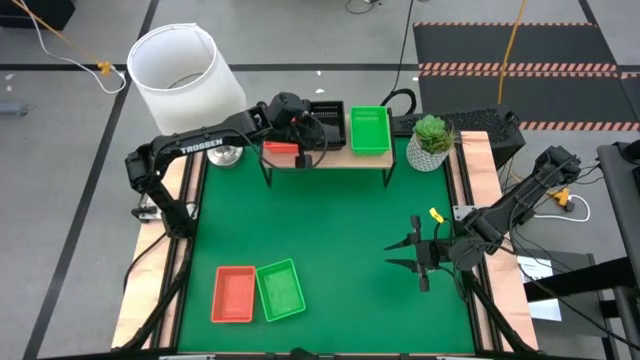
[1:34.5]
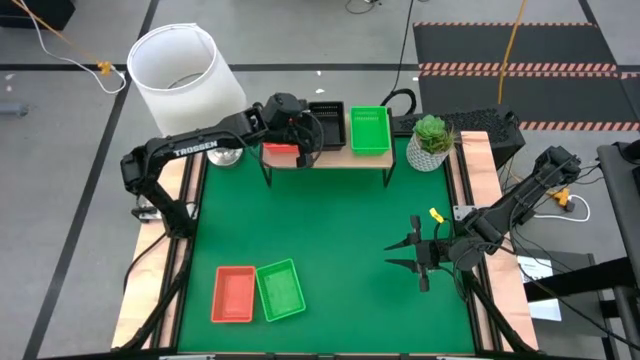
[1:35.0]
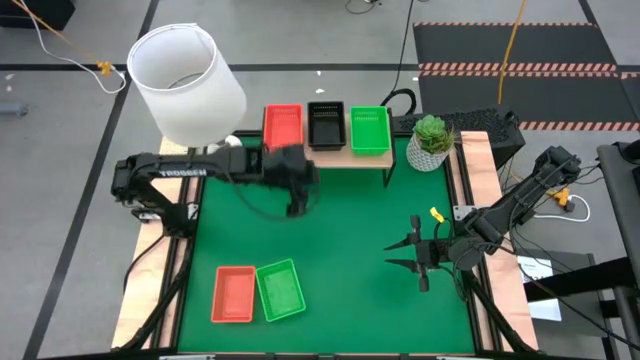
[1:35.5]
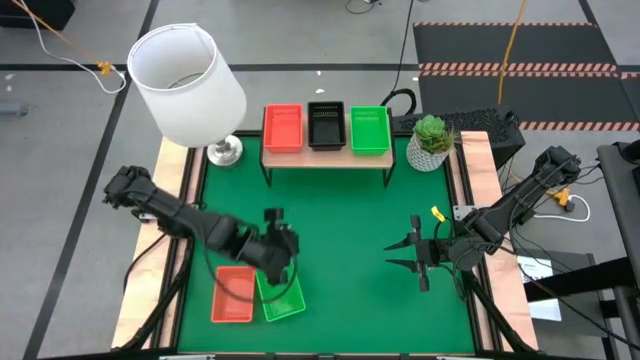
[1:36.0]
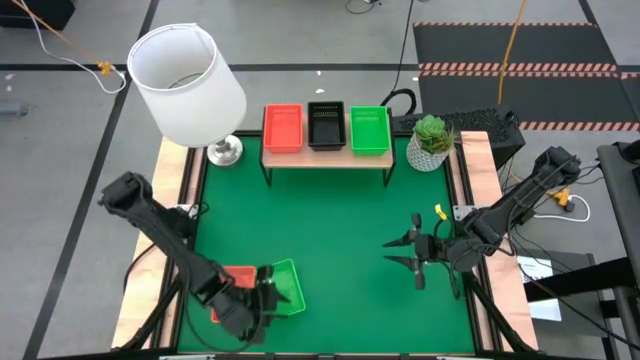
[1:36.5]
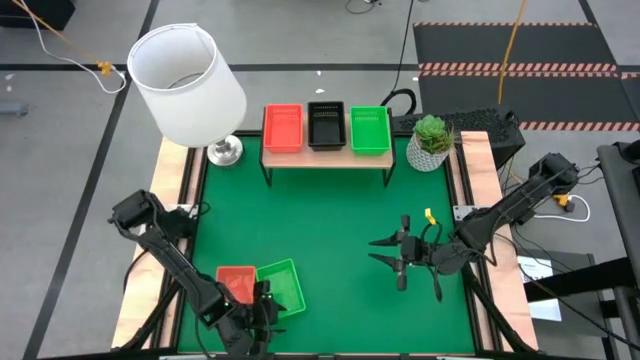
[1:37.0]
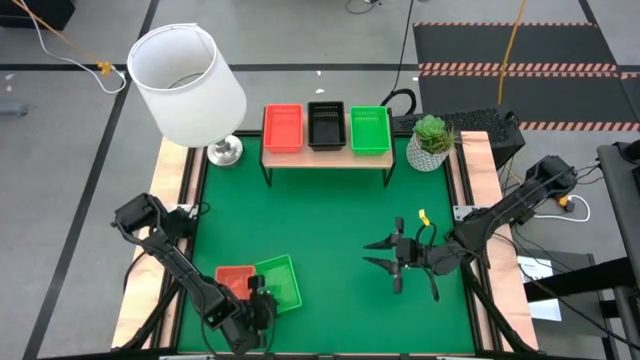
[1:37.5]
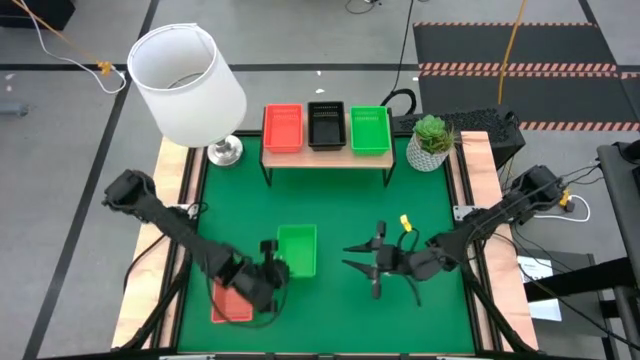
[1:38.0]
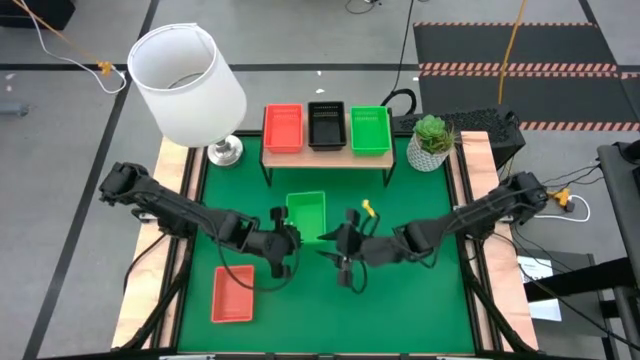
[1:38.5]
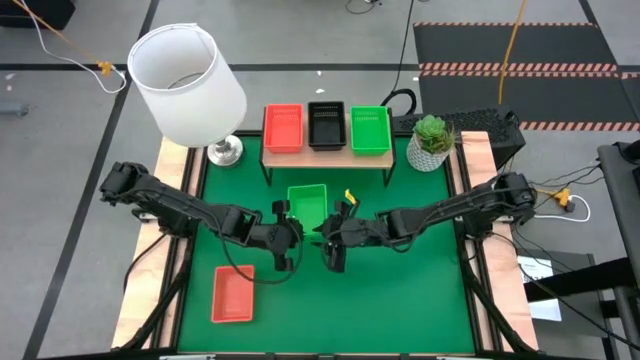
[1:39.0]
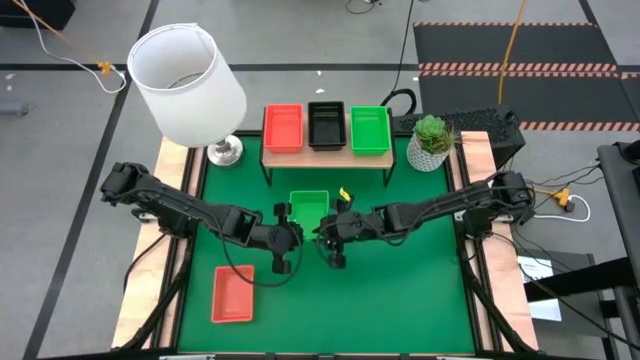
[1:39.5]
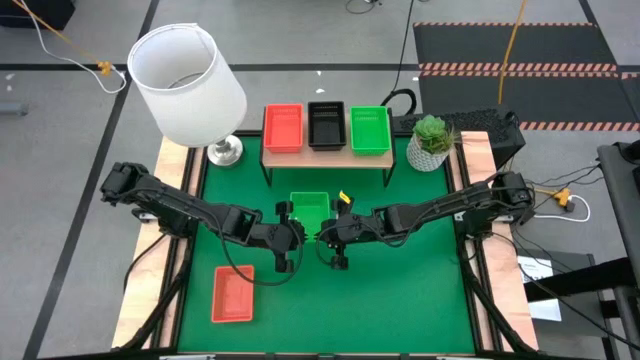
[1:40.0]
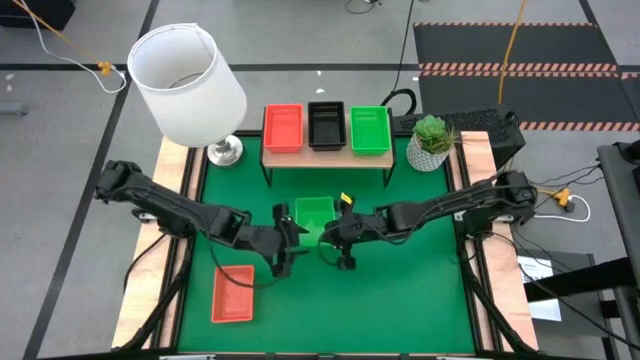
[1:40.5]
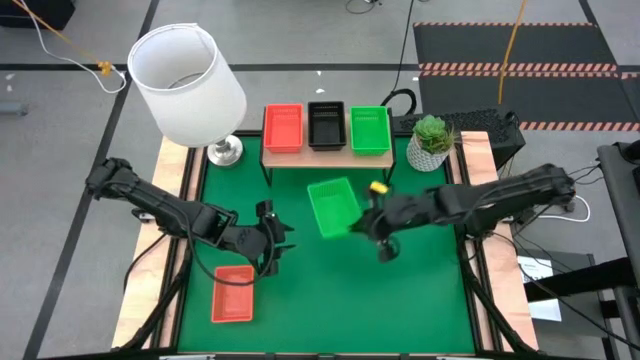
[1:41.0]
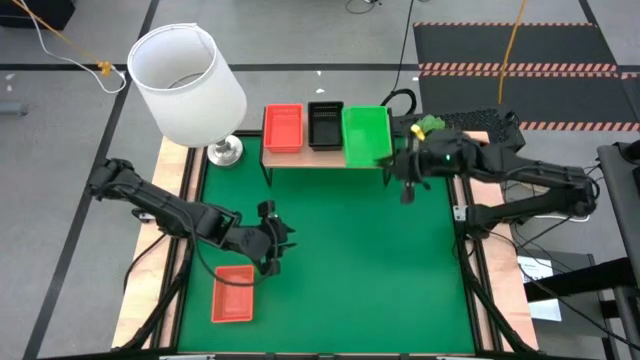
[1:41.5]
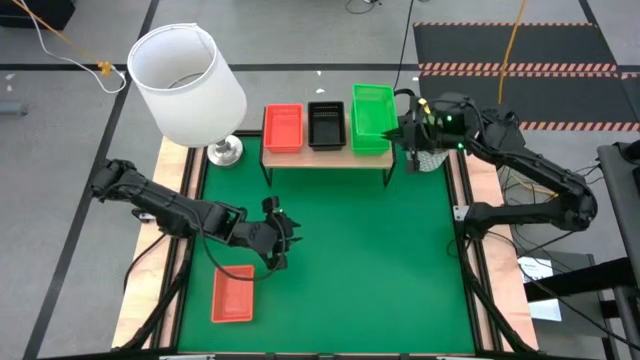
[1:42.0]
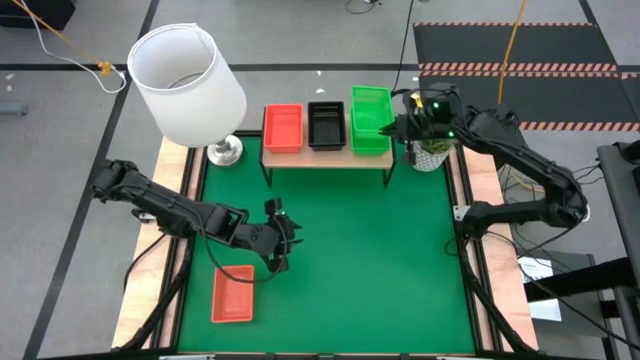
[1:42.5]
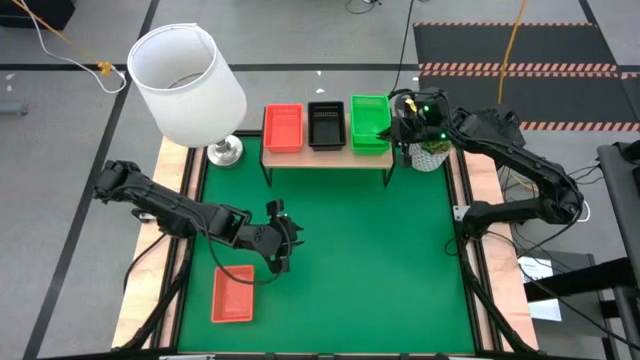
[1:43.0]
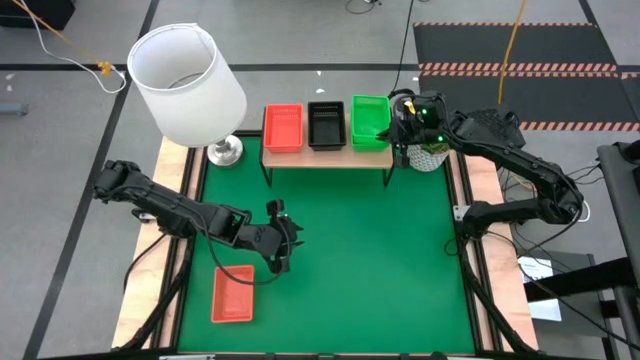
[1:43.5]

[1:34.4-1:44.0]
Task: Stack baskets on shelf by color
Stack the green basket into the green basket on the shelf

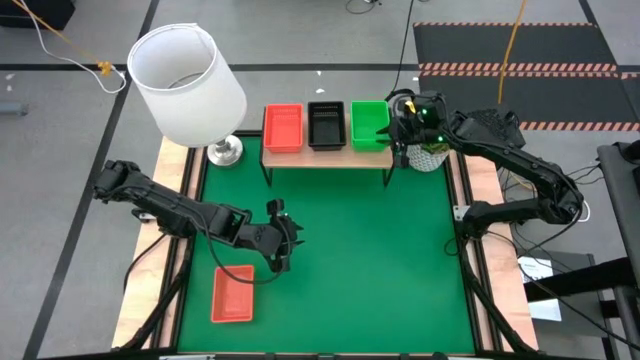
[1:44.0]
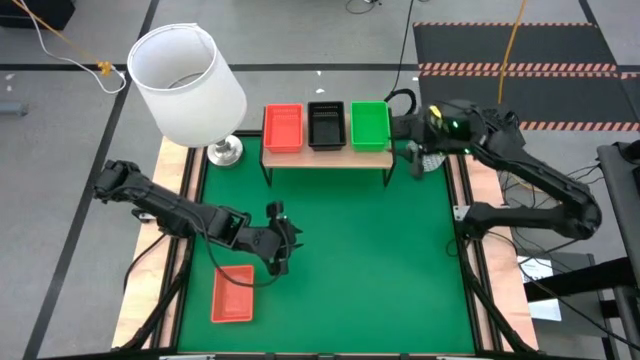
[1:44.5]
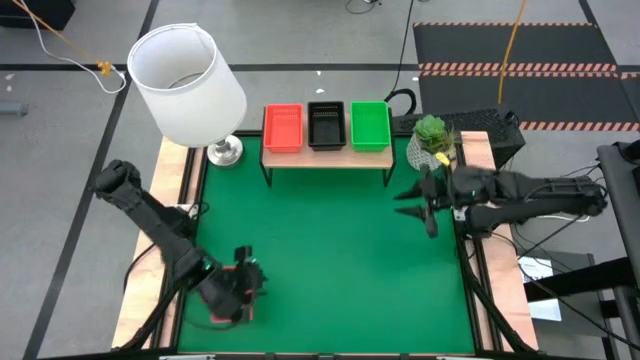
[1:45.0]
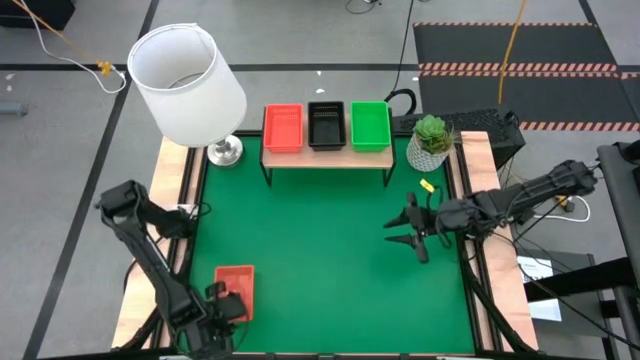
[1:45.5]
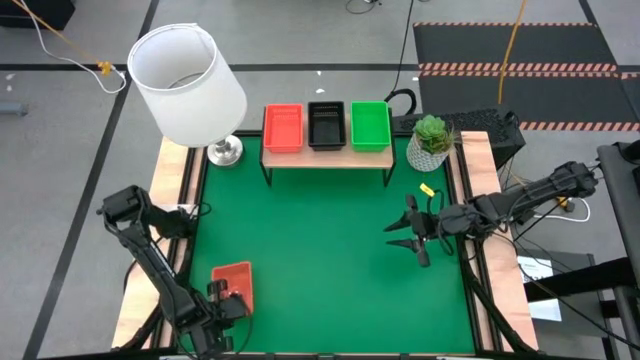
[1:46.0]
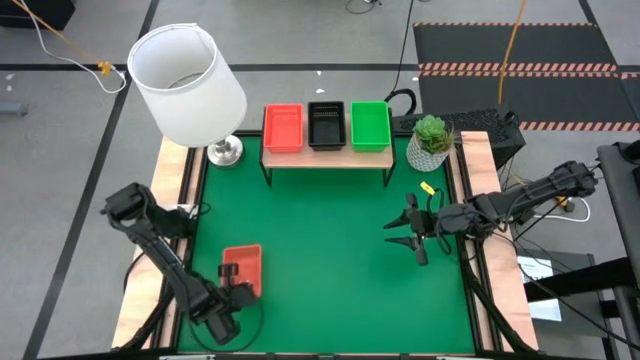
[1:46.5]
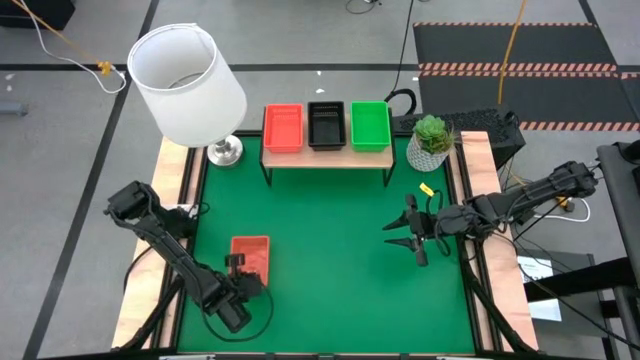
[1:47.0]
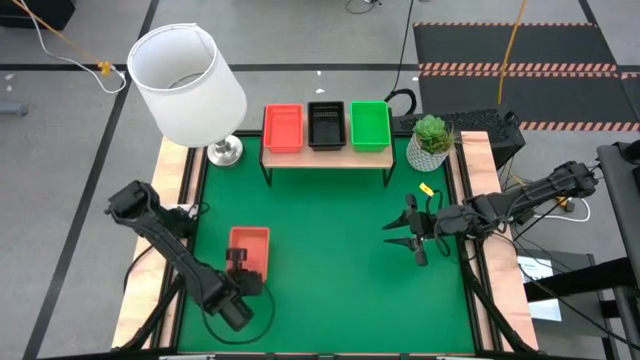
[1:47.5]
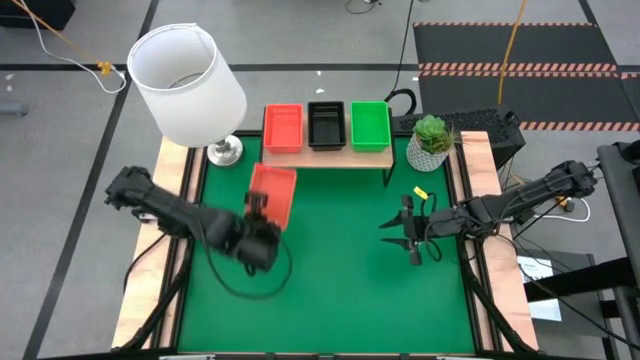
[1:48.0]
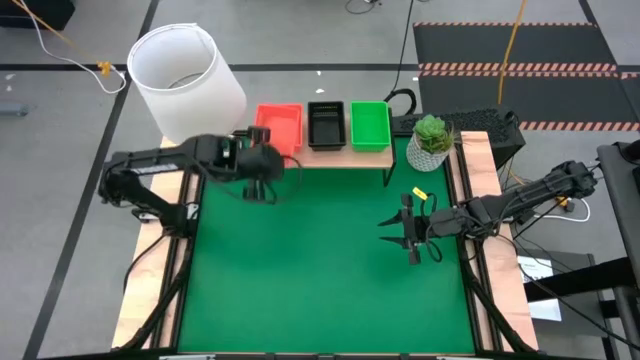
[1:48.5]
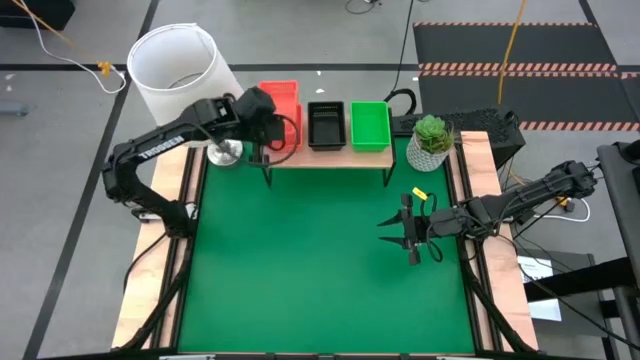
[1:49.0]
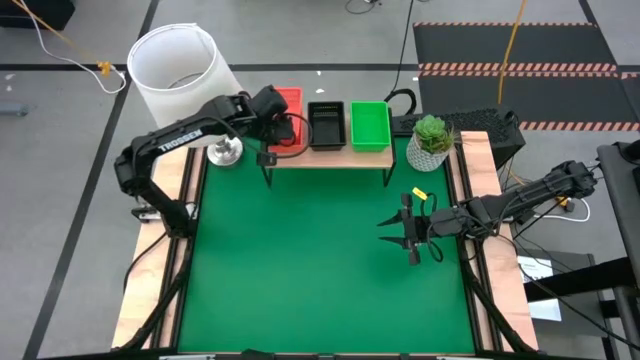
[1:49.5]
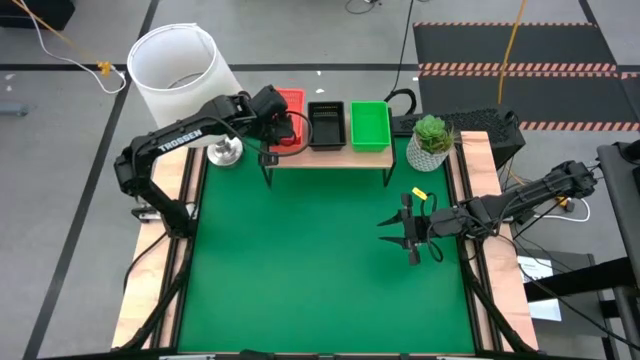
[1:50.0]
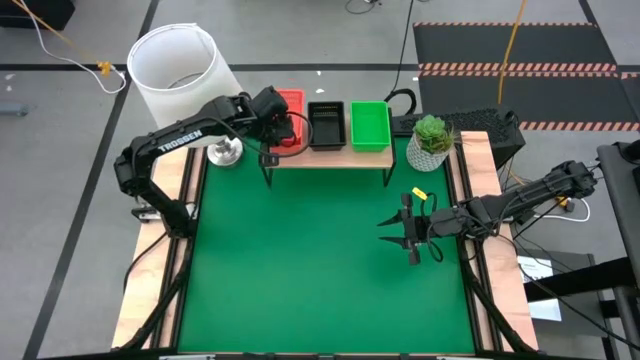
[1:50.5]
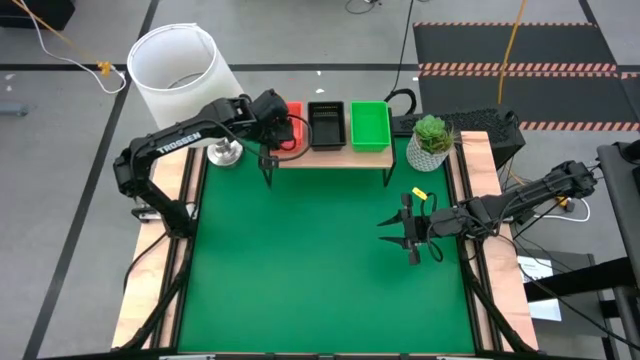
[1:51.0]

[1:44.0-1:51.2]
Stack the orange basket into the orange basket on the shelf

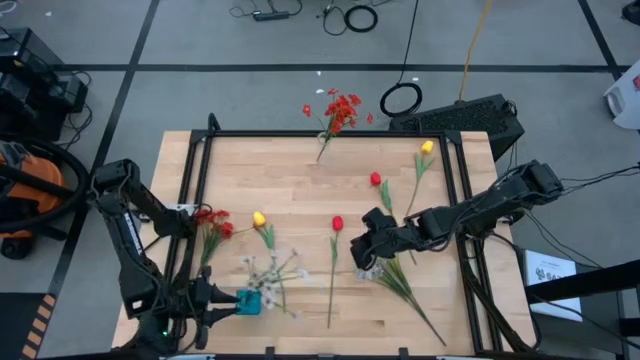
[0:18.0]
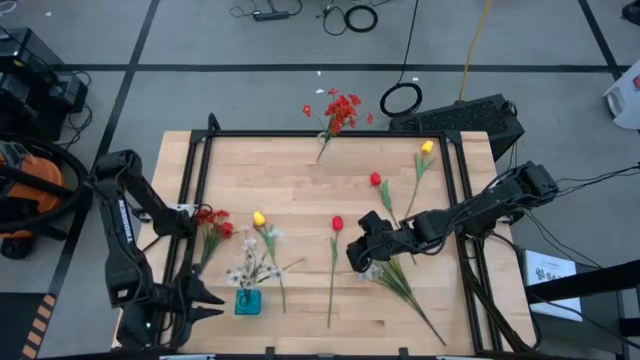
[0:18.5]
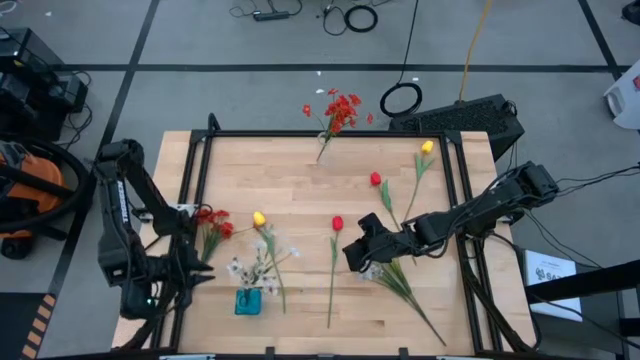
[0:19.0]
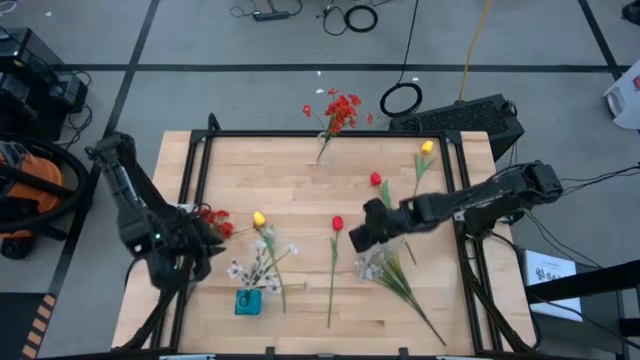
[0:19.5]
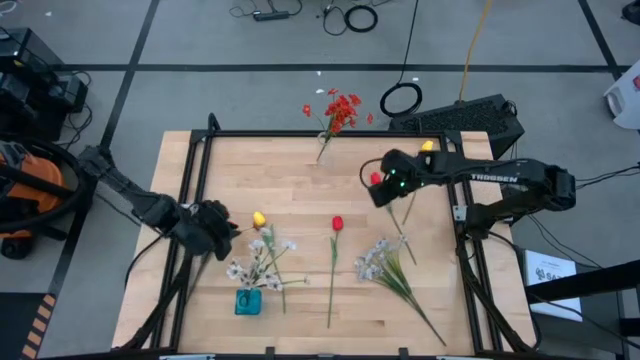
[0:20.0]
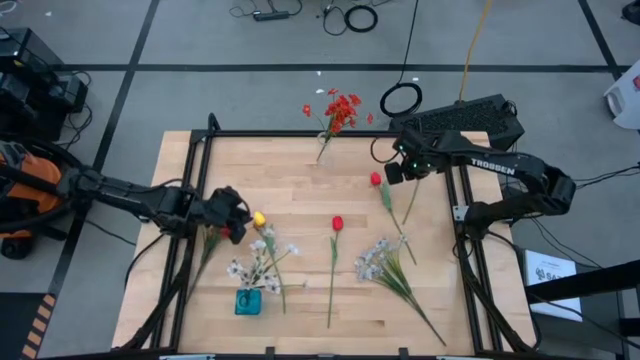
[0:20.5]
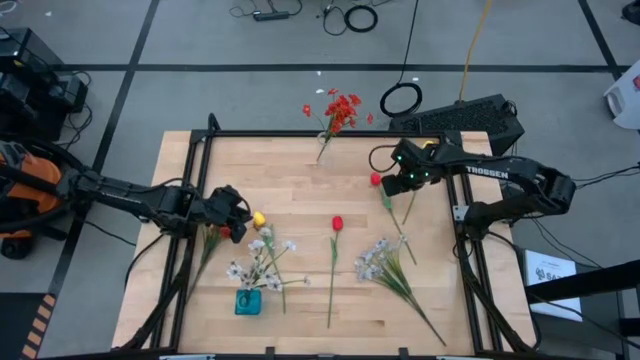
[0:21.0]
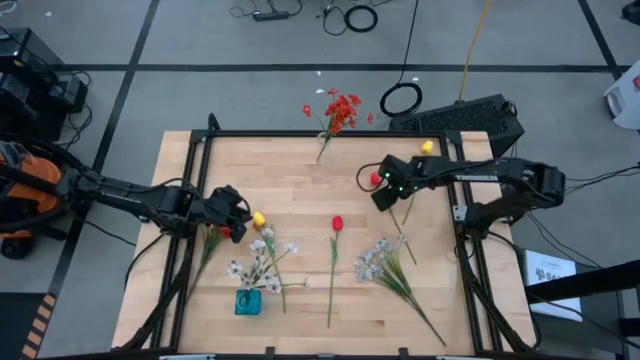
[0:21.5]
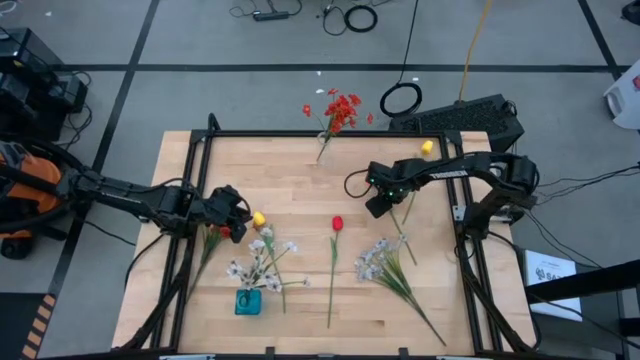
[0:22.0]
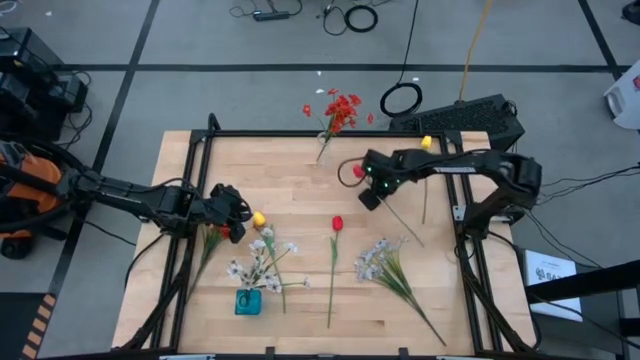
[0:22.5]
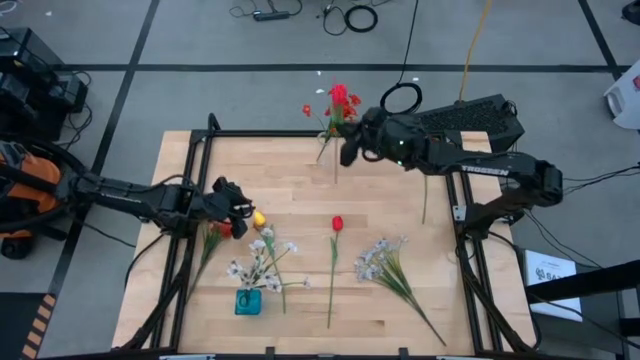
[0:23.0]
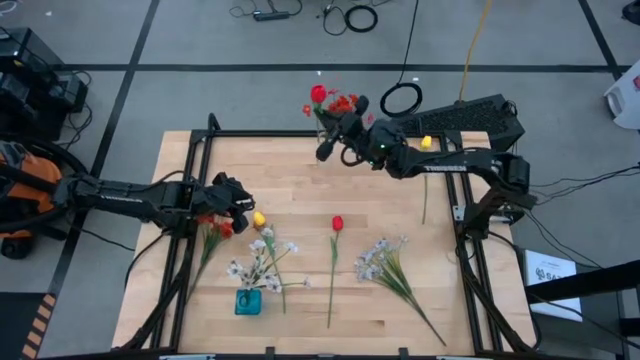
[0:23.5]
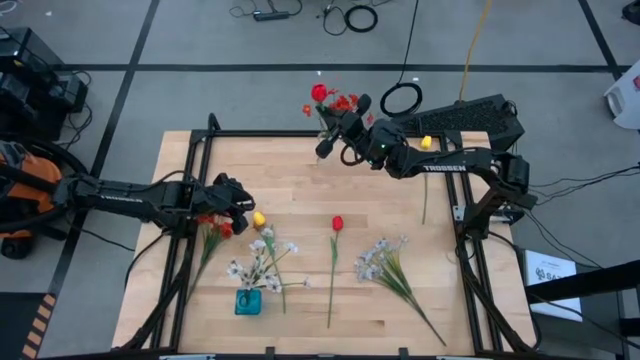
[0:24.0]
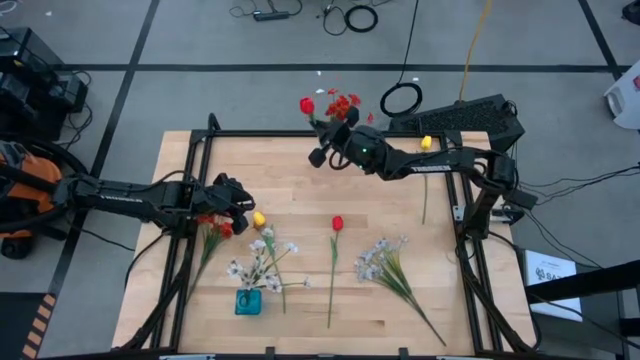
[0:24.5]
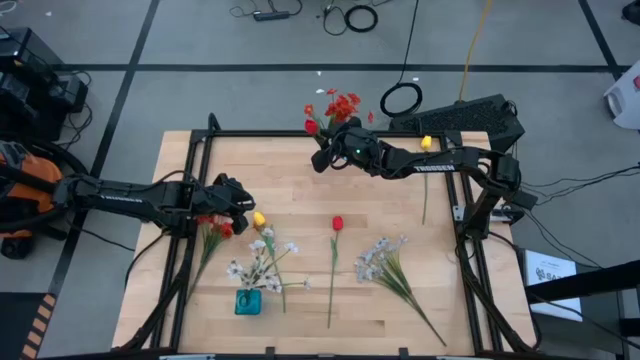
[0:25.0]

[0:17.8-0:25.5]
Task: Sort flowers into vase by color
Put the right red flower into the transparent vase
